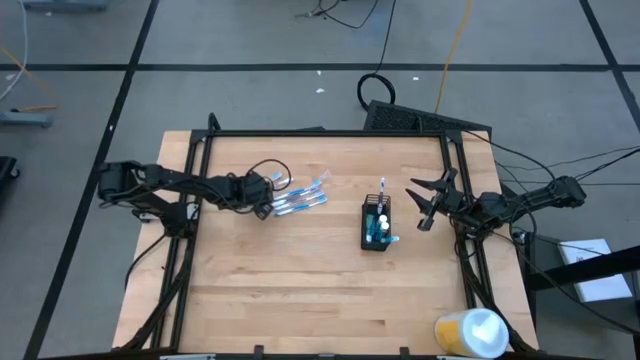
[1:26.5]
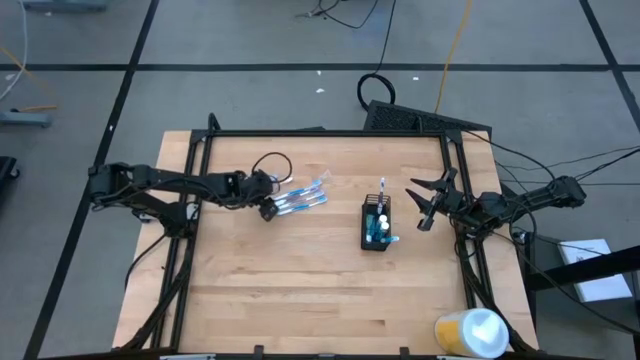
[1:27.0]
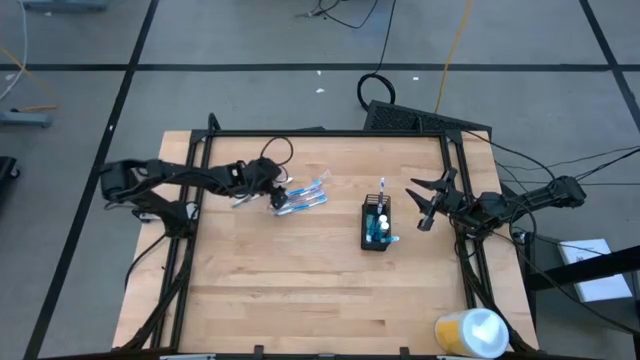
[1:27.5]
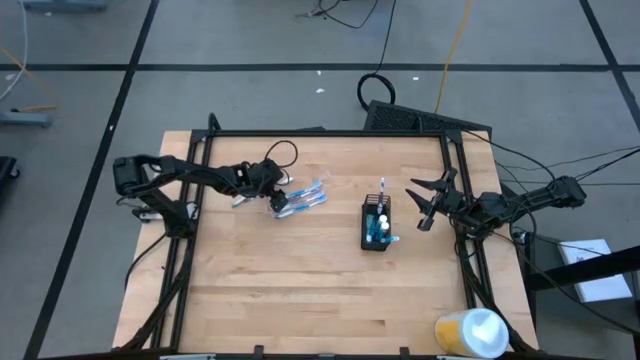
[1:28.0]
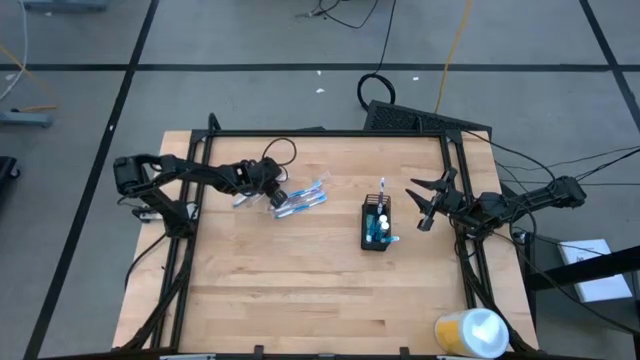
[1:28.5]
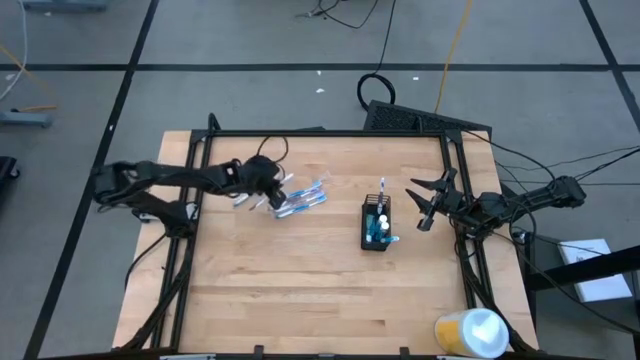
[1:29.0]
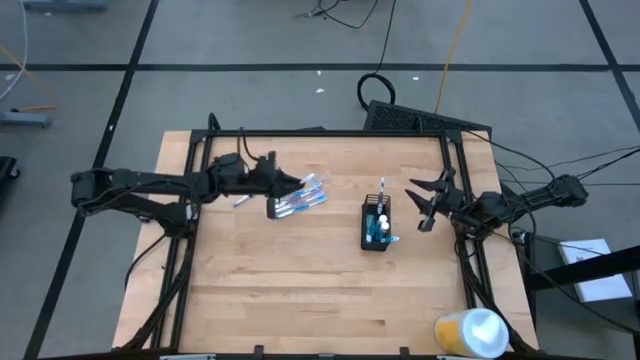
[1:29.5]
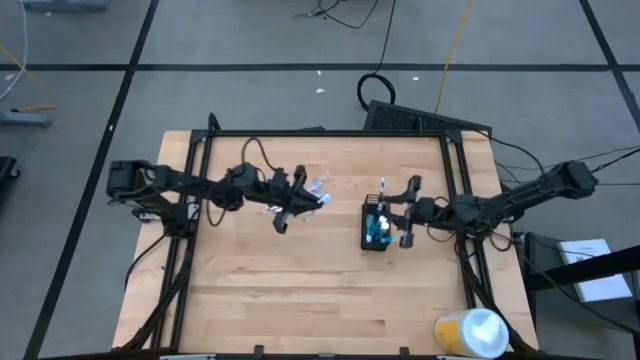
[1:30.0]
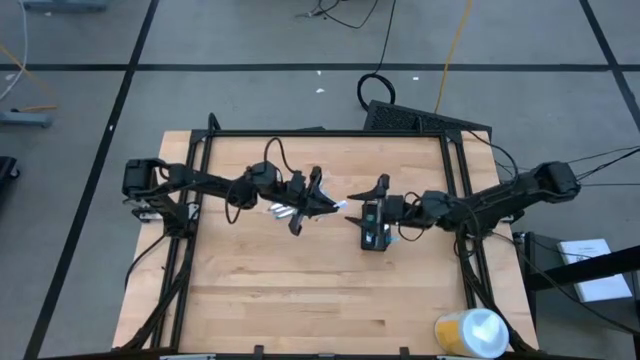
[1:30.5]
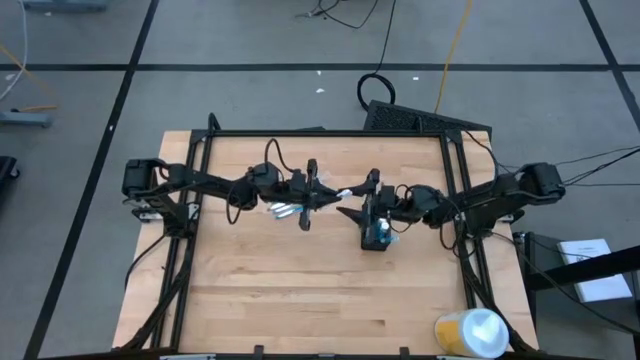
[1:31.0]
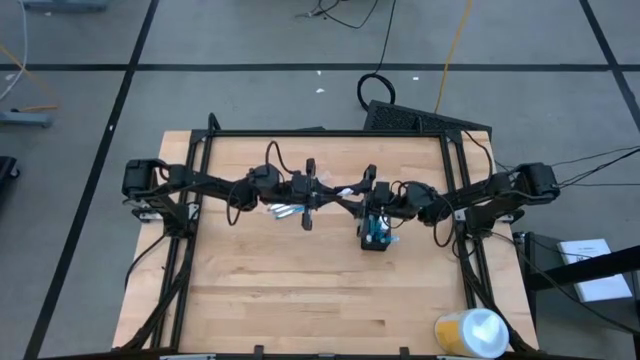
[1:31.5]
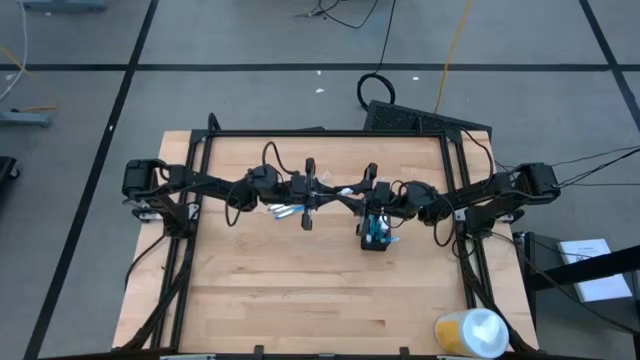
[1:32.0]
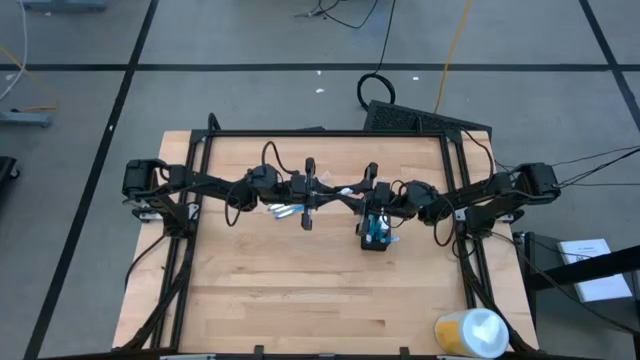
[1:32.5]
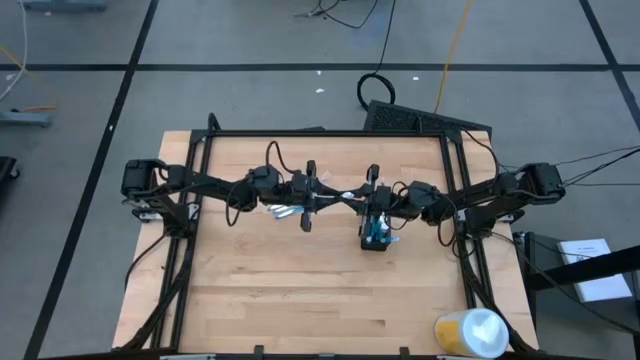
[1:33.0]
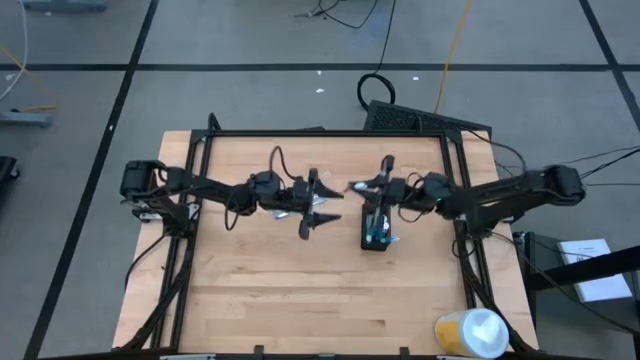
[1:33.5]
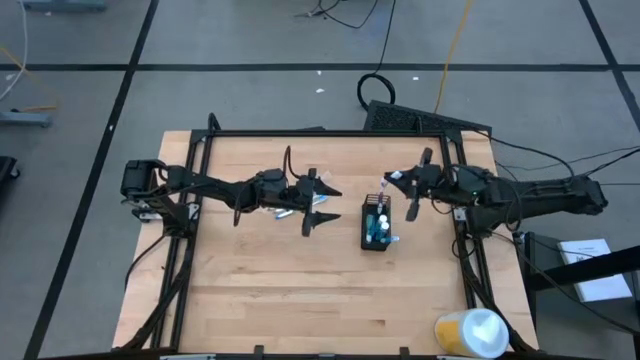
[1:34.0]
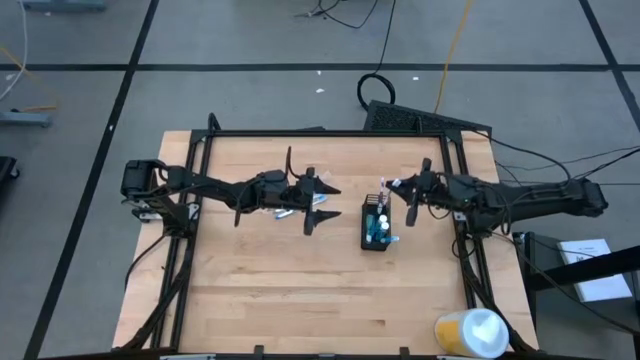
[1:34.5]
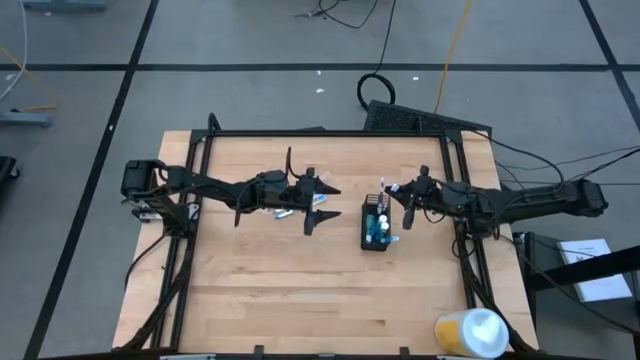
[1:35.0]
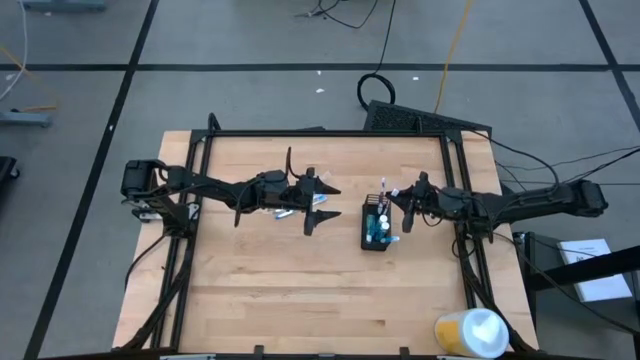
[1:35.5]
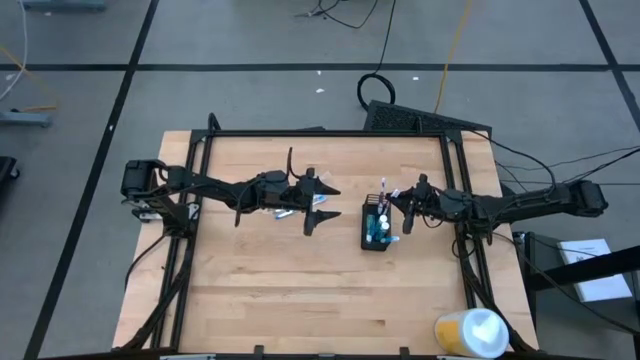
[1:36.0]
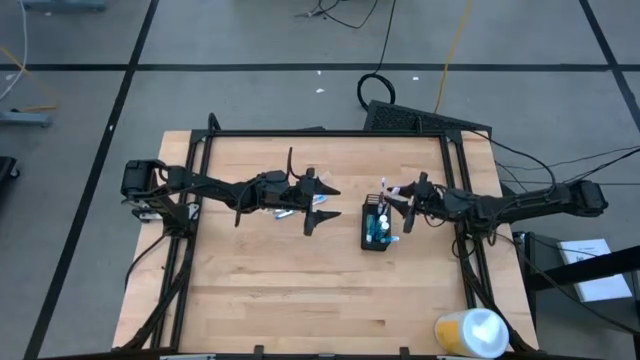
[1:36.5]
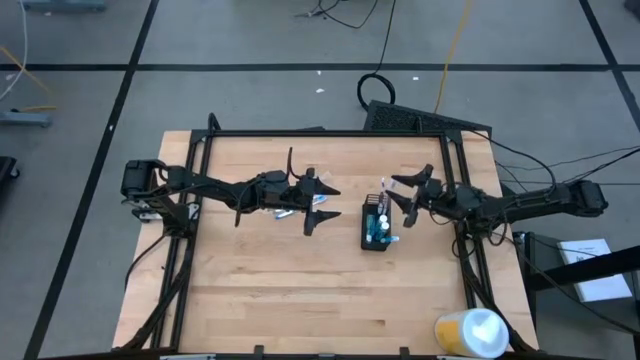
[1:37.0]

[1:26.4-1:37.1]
Task: Pick & Place toothbrushing station
Put the purple toothbrush into the top section of the mesh organizer

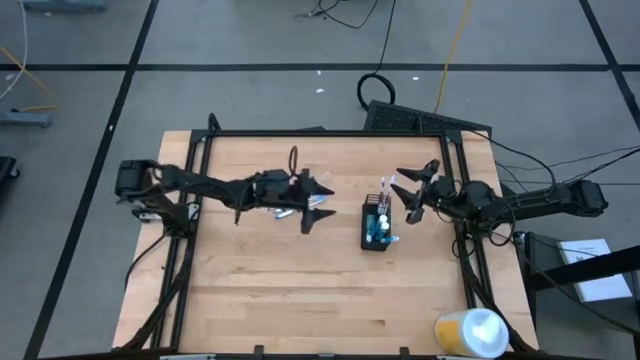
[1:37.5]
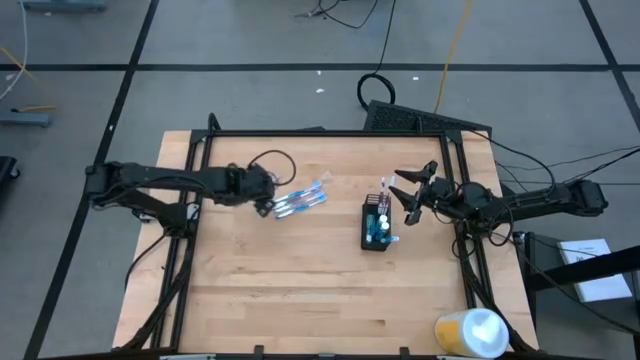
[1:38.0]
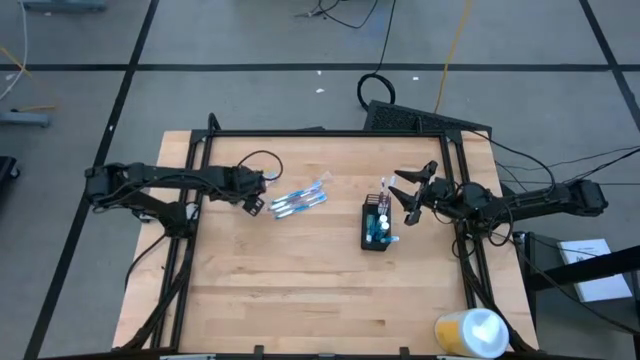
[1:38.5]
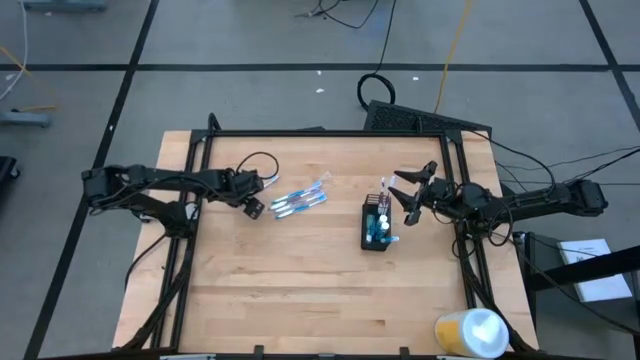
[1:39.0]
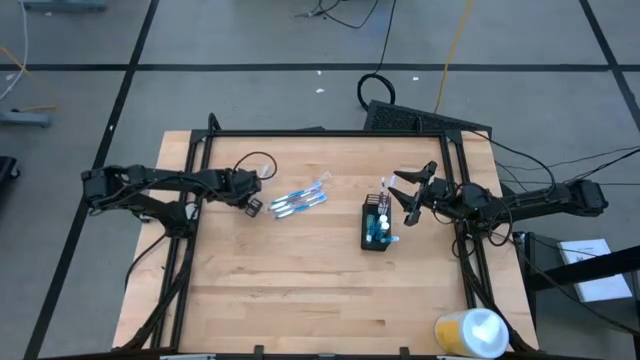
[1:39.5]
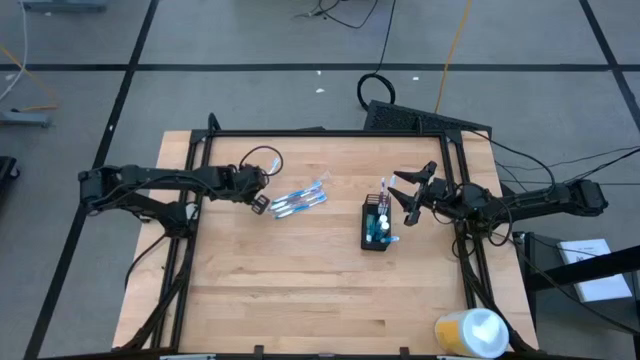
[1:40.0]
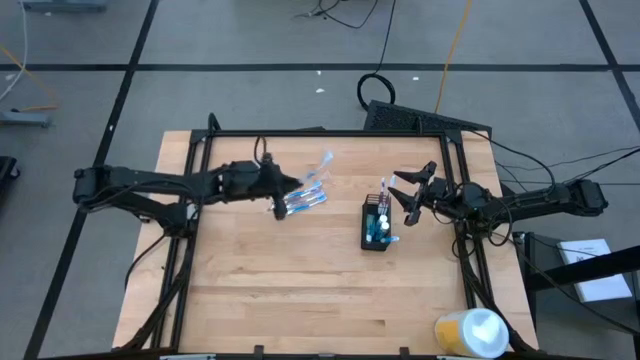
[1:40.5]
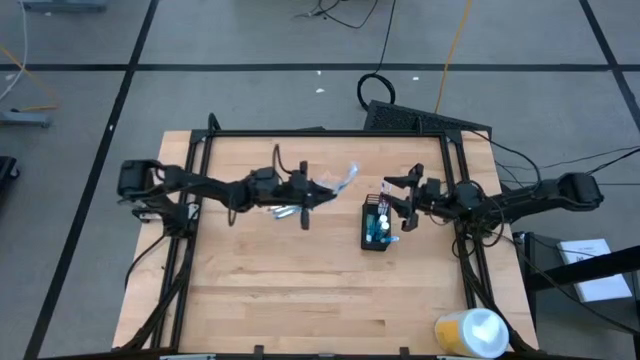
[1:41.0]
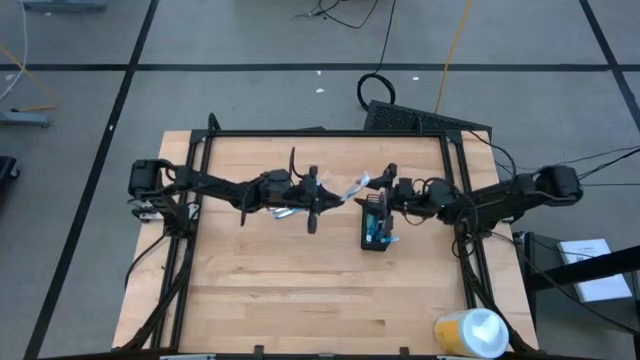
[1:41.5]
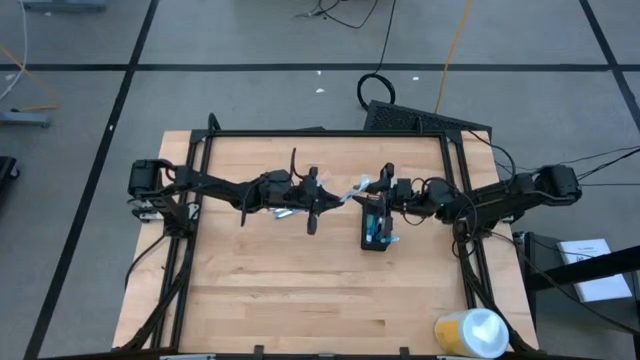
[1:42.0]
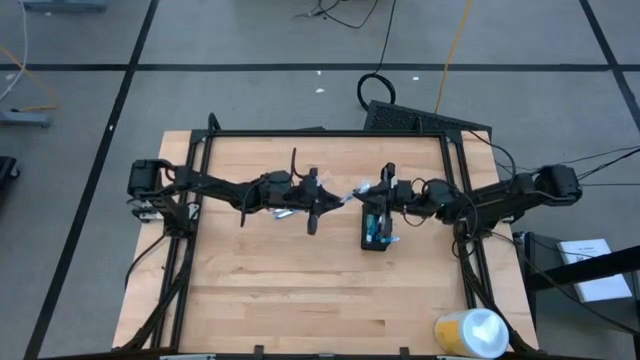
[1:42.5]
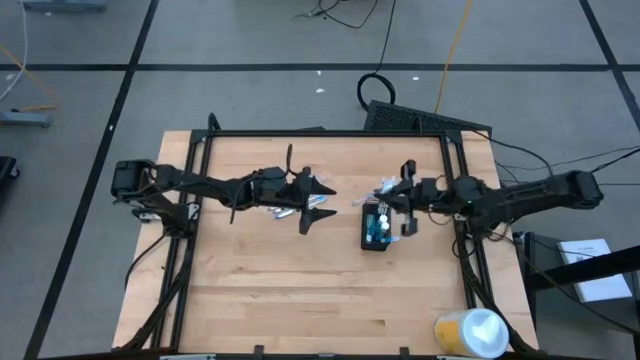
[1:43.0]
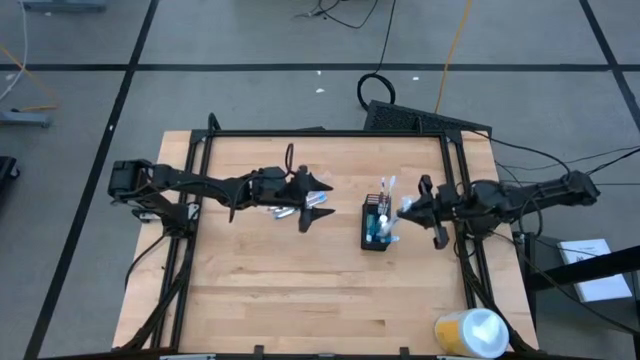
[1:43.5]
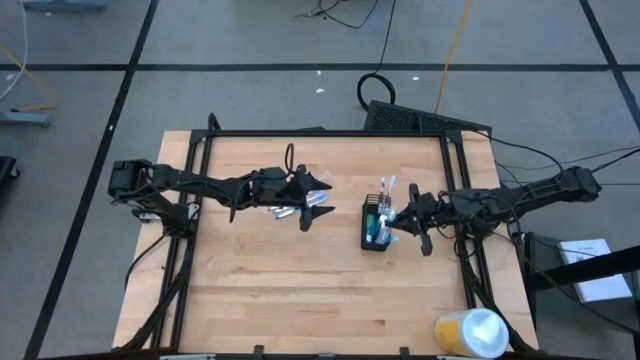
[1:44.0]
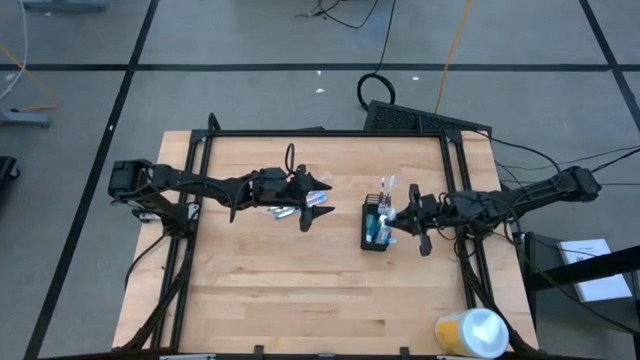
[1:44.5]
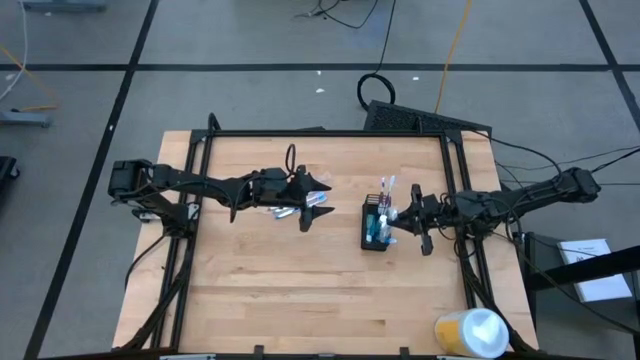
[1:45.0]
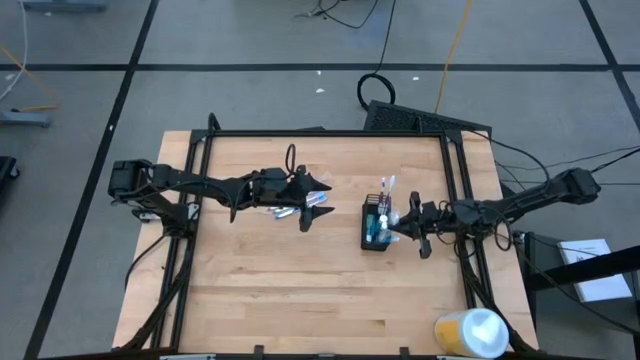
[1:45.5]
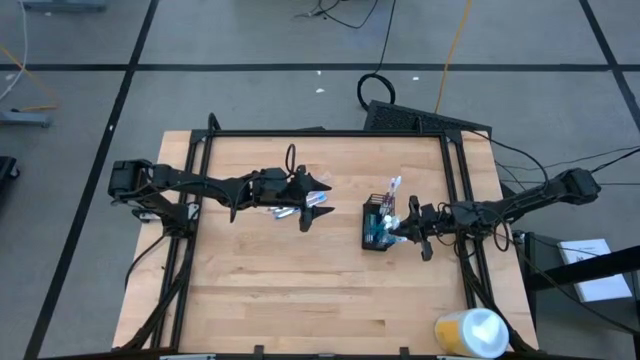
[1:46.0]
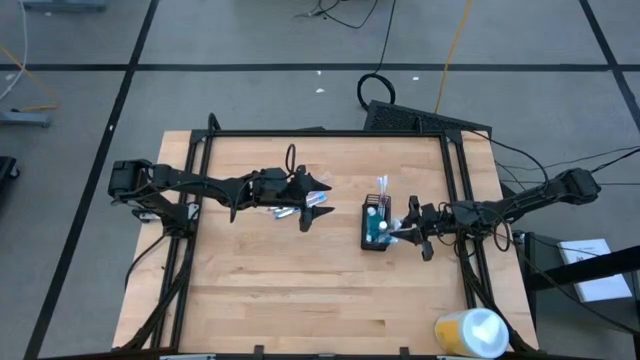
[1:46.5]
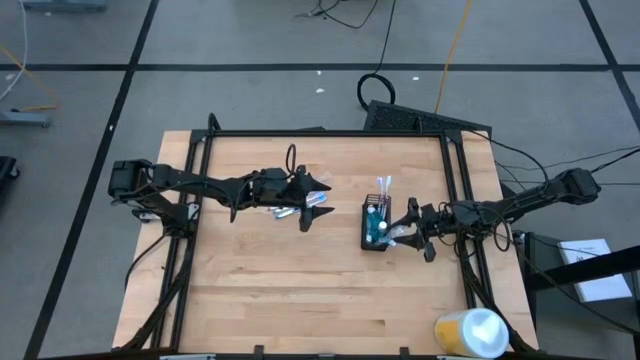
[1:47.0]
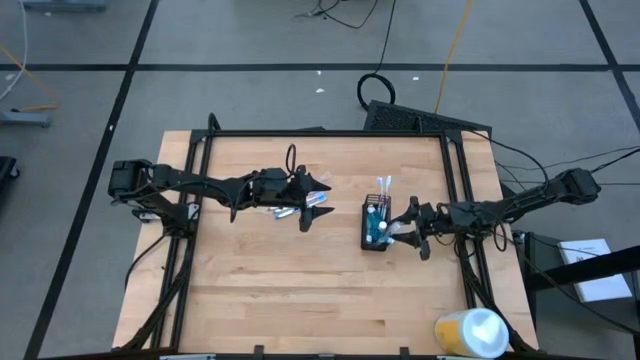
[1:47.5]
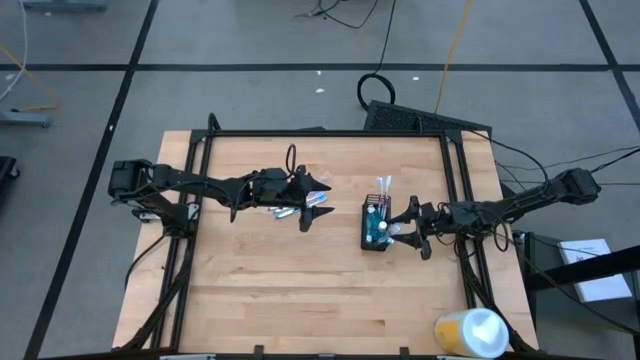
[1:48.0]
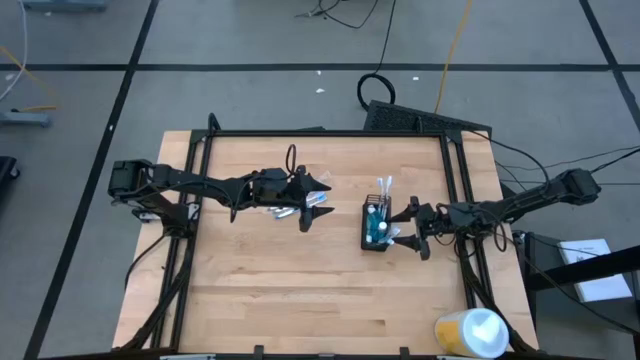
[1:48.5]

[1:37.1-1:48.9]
Put the blue toothbrush into the bottom section of the mesh organizer
